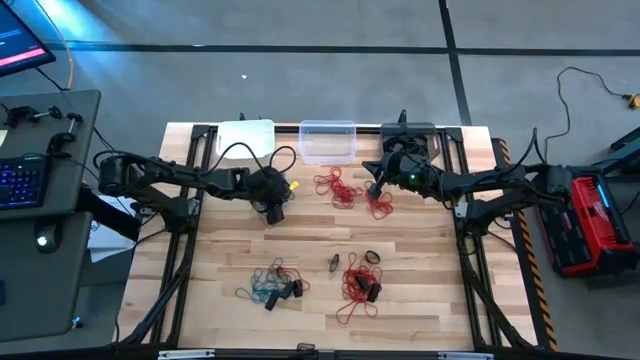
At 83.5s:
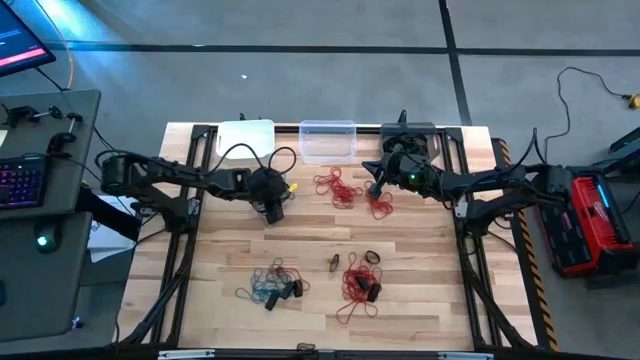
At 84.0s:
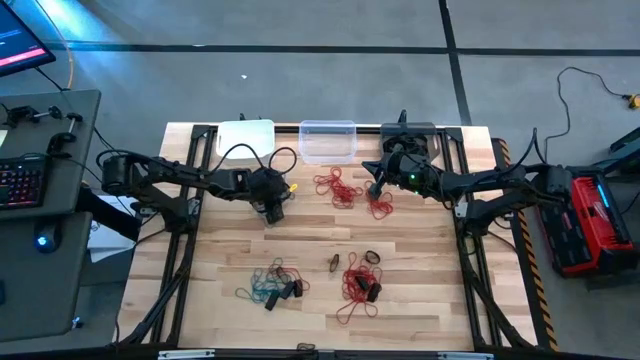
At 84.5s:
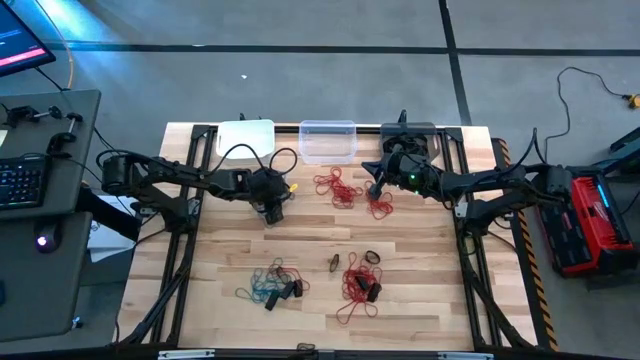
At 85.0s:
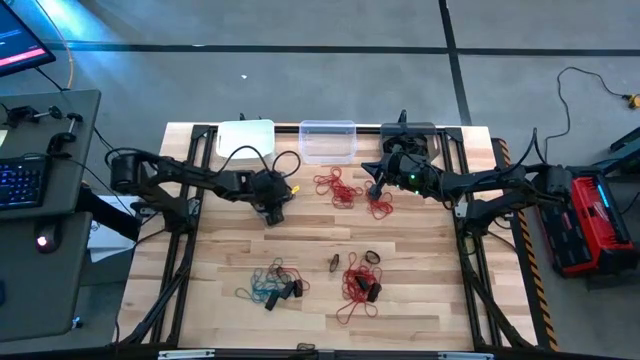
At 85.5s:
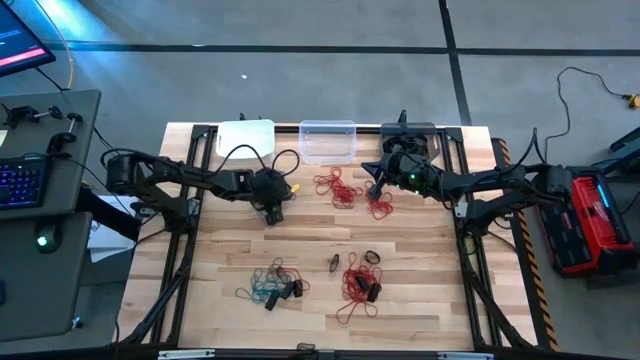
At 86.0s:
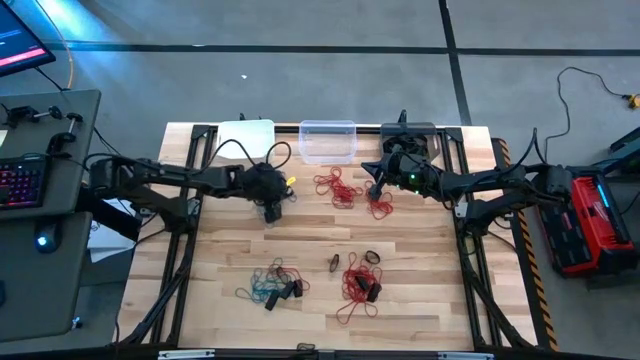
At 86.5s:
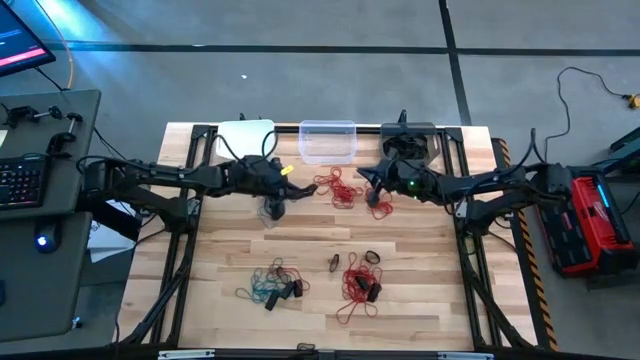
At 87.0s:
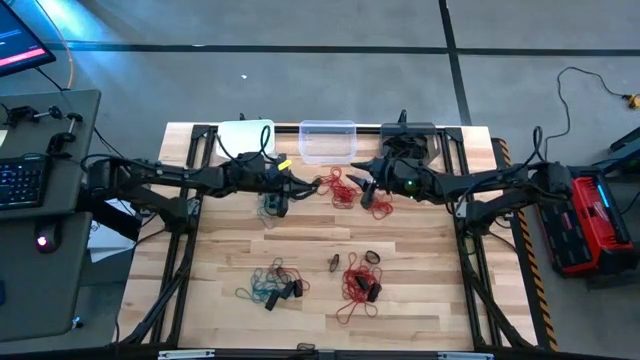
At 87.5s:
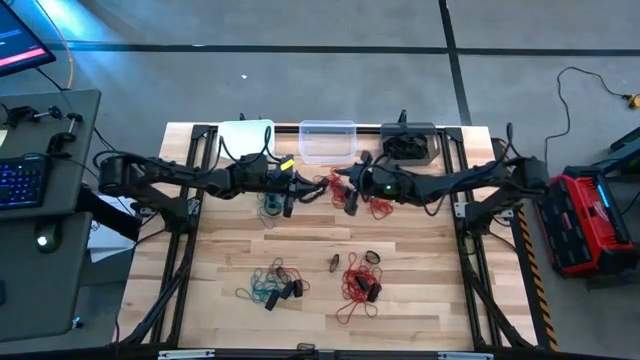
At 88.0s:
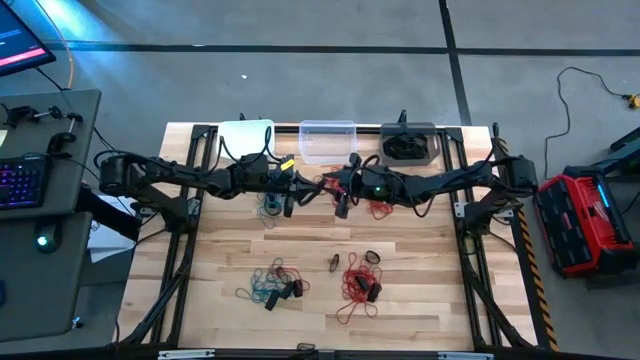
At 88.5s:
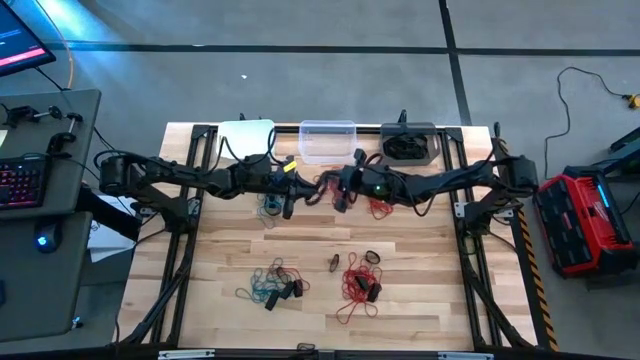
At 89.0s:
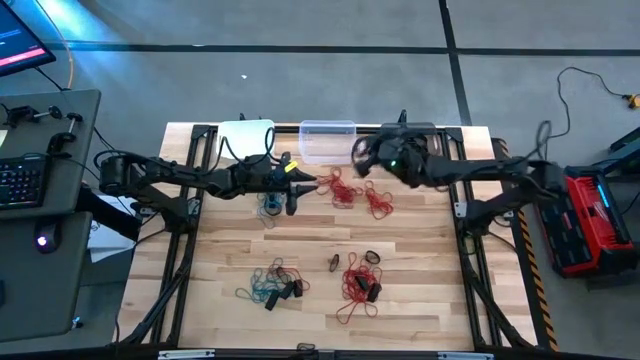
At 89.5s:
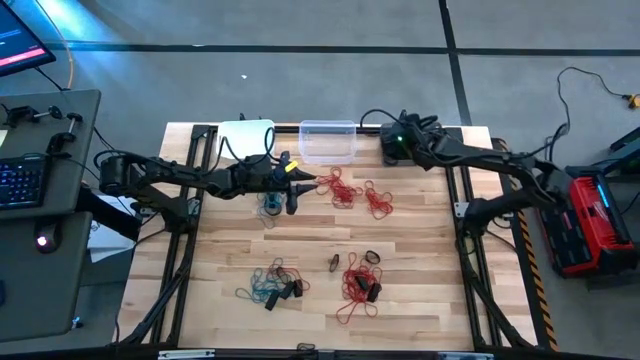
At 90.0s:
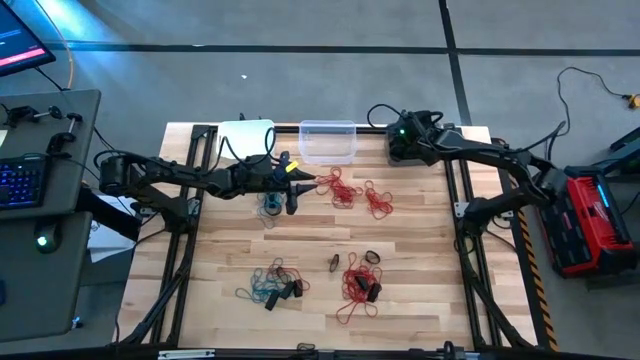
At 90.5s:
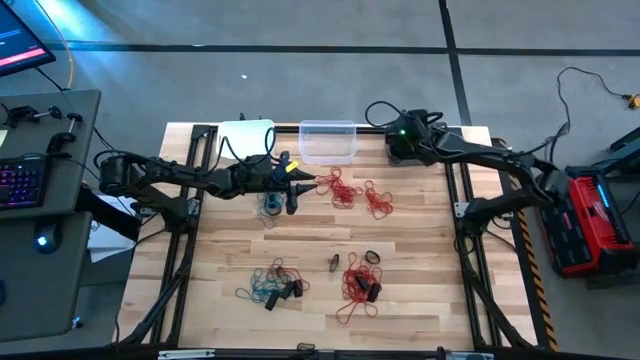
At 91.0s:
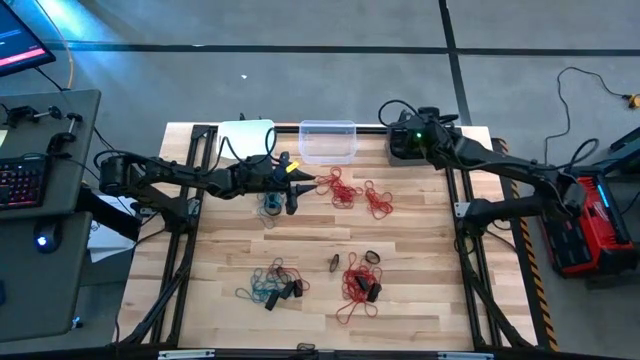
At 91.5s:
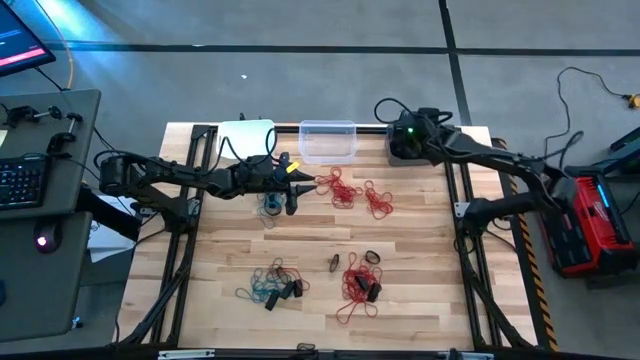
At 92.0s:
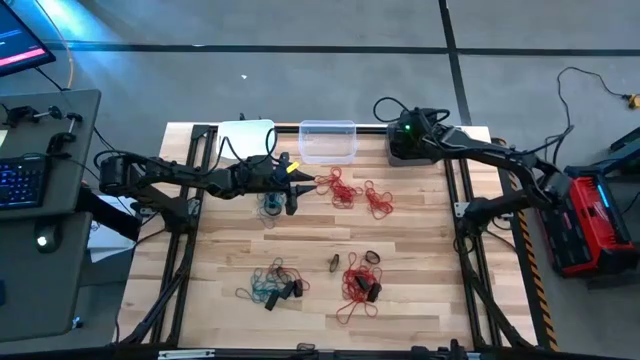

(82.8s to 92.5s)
Task: Sort rubber bands into baskets
Put the black rubber band into the black bin

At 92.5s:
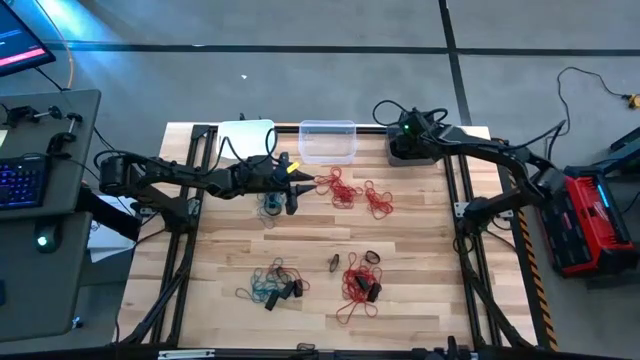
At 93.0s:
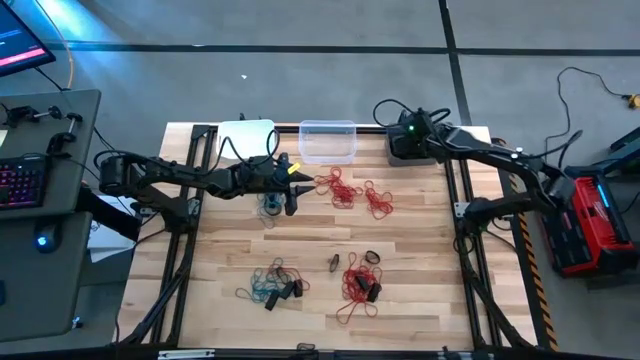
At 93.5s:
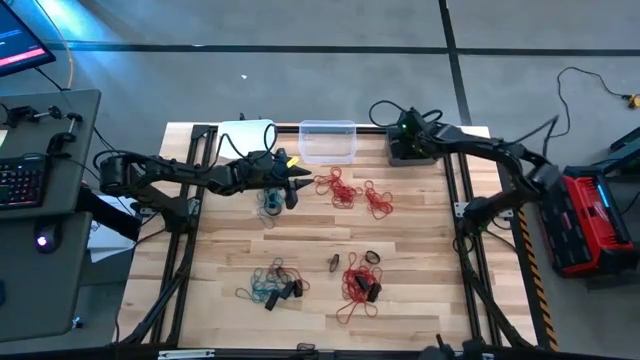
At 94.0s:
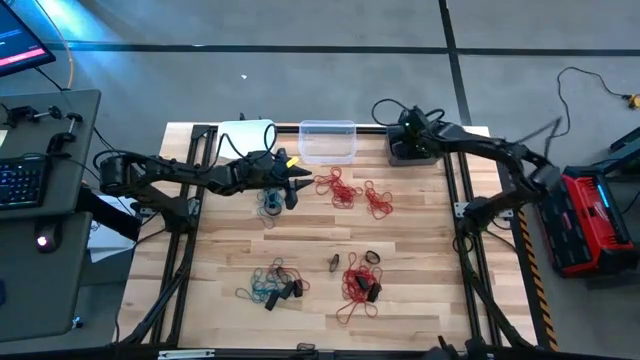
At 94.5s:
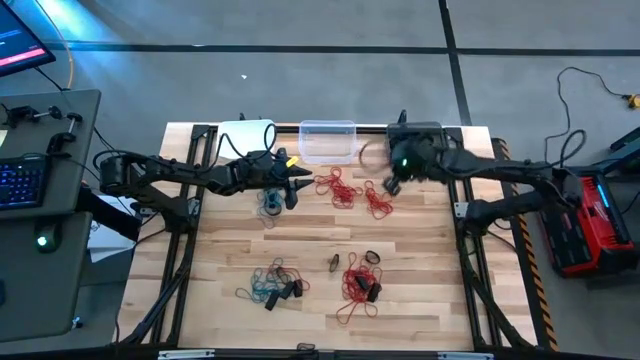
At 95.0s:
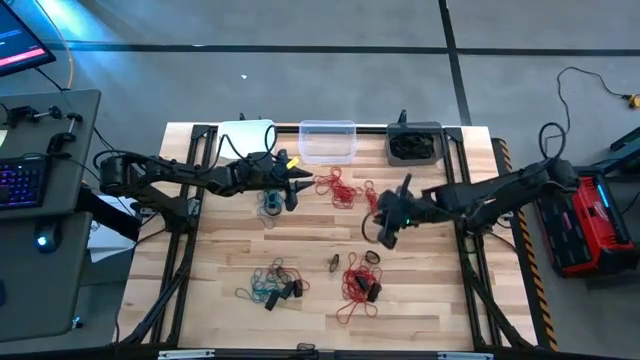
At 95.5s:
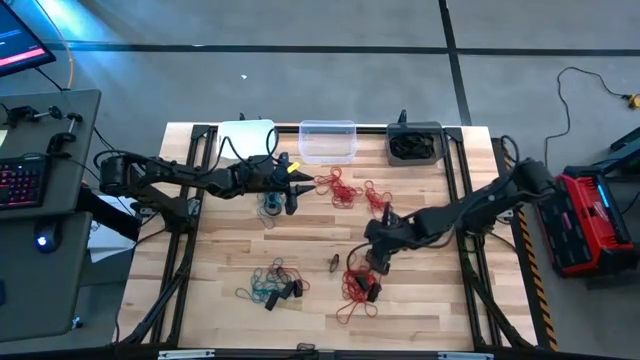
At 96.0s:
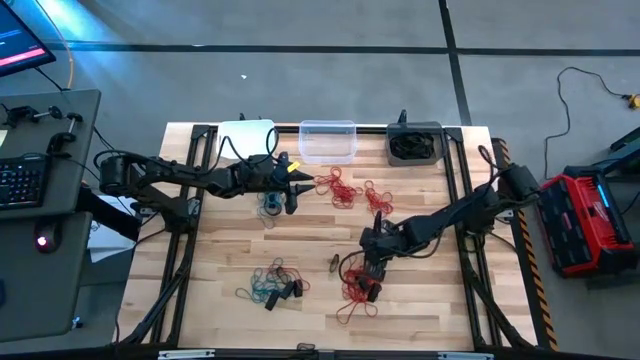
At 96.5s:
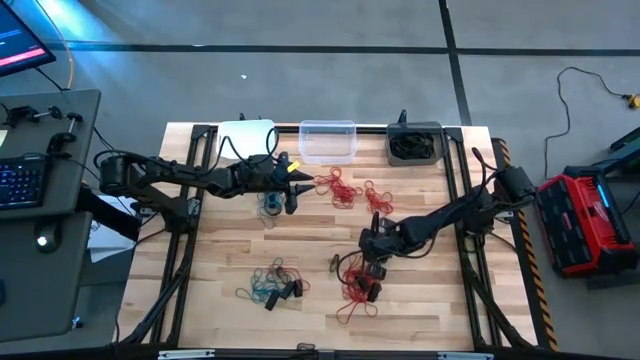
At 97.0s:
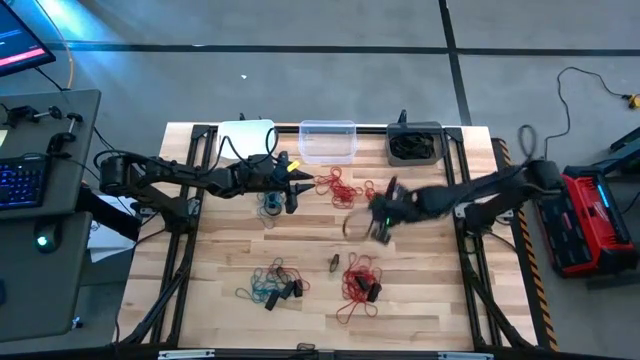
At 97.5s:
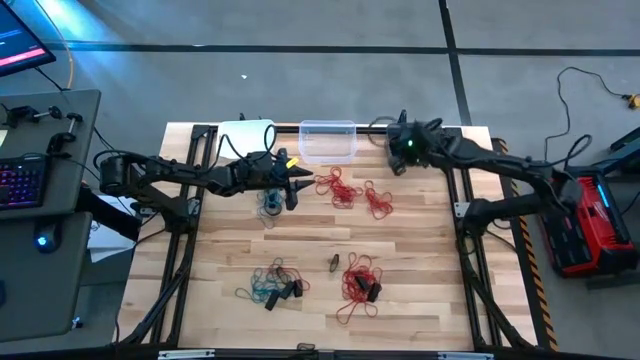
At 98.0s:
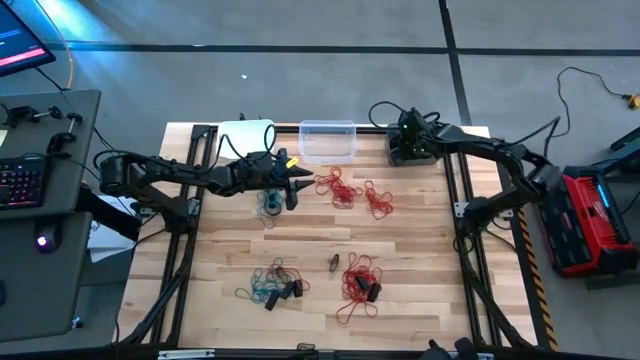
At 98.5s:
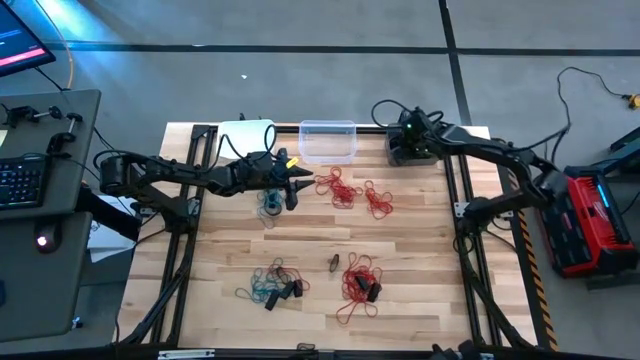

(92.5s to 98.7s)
Put the black rubber band into the black bin

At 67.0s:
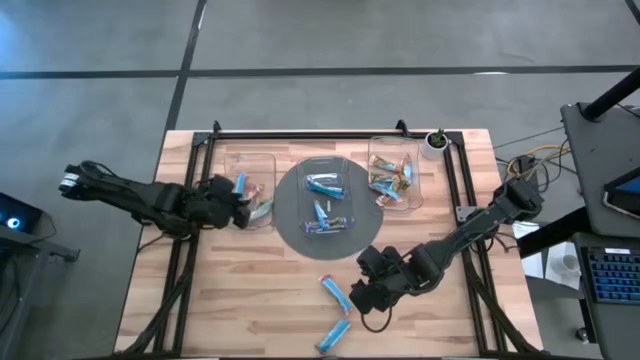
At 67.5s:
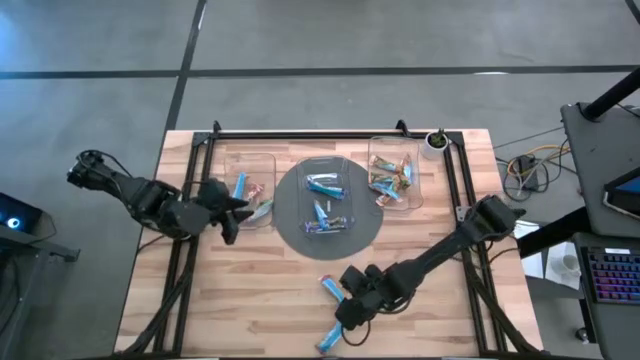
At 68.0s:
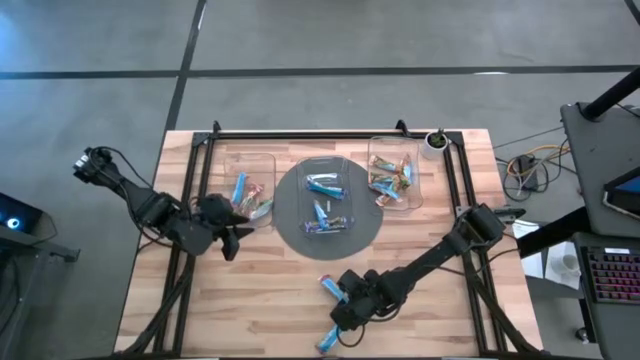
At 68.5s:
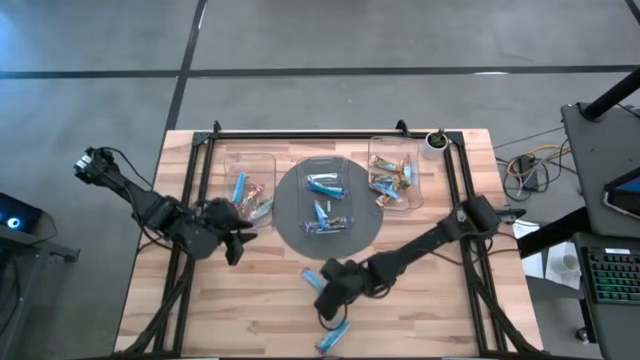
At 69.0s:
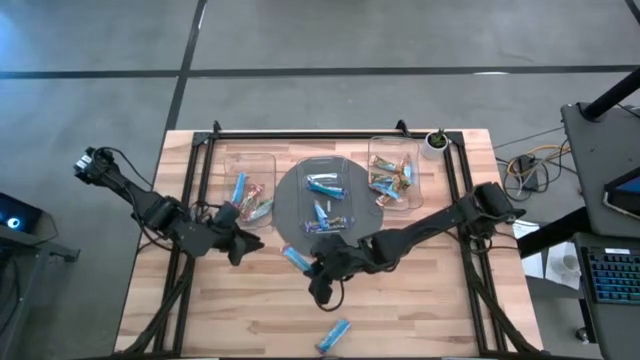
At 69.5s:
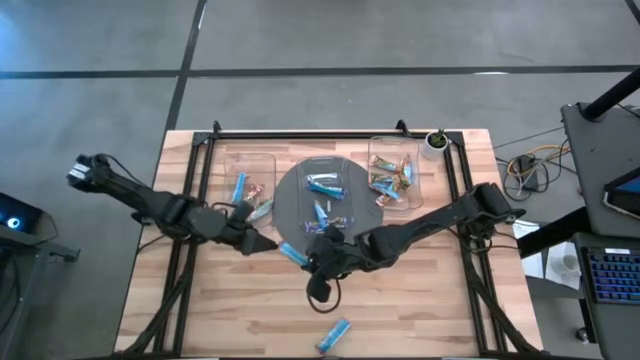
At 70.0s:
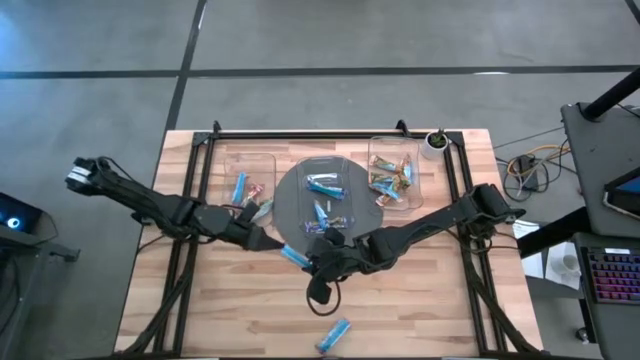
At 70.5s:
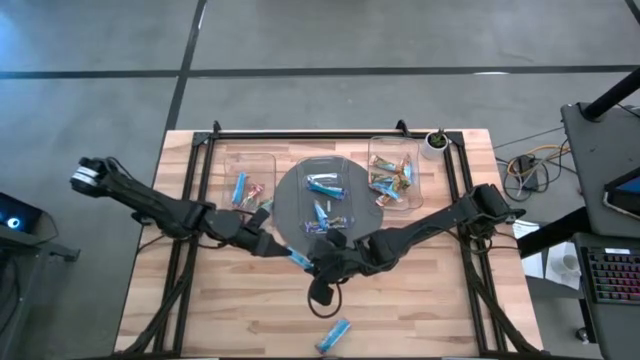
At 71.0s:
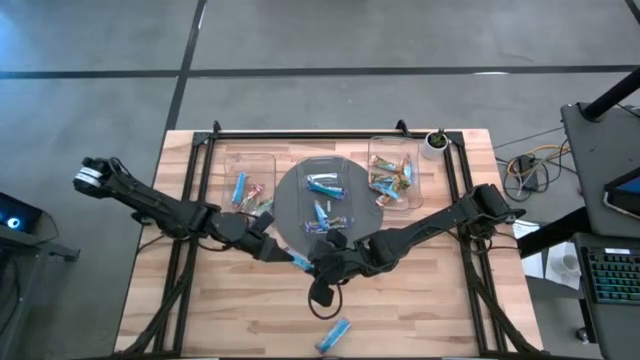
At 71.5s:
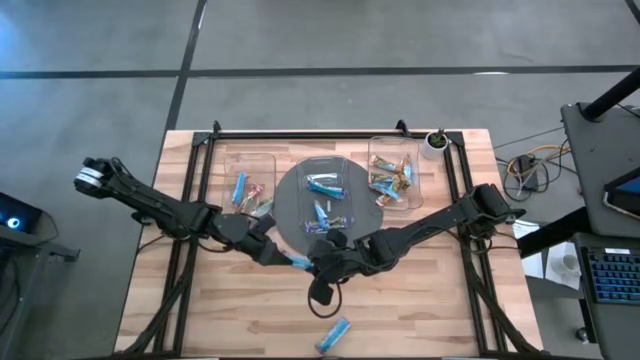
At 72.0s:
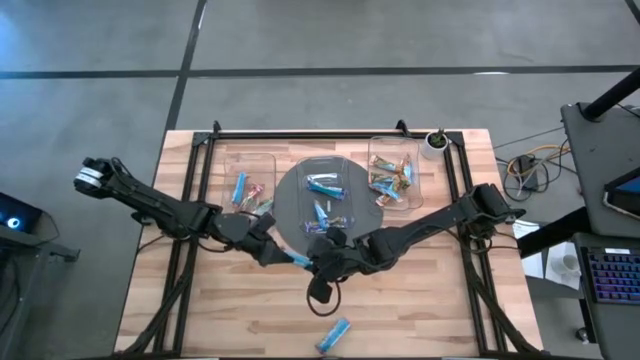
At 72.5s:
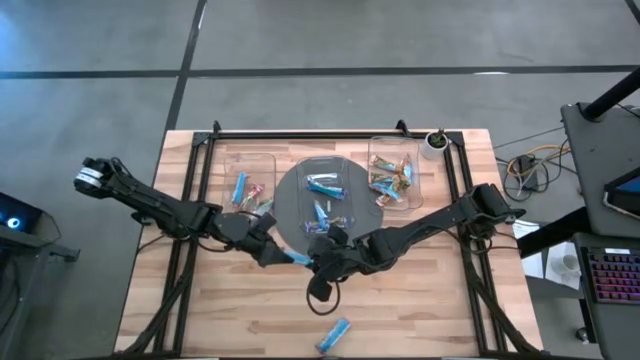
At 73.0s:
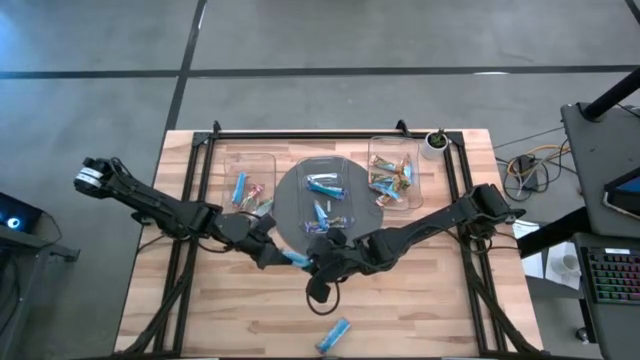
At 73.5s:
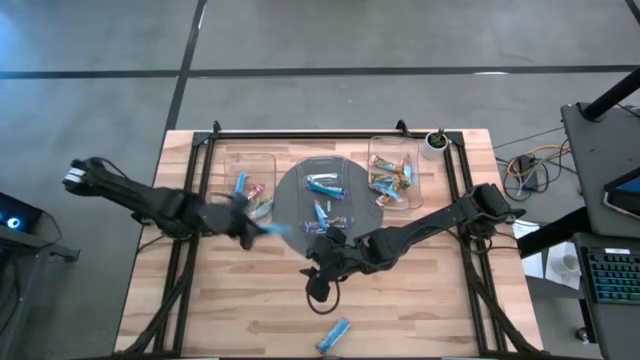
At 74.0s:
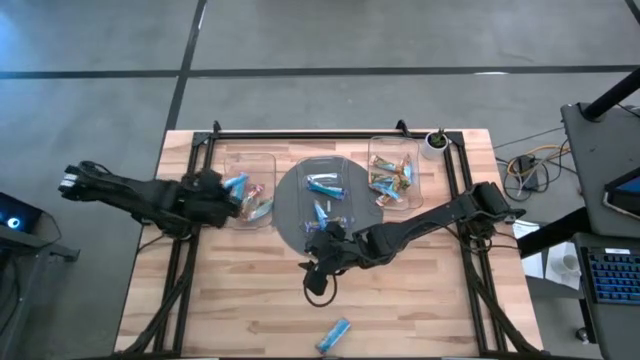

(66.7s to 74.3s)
Task: Pick and place Granola Bars by type
Put the red granola bar into the left transparent bin
